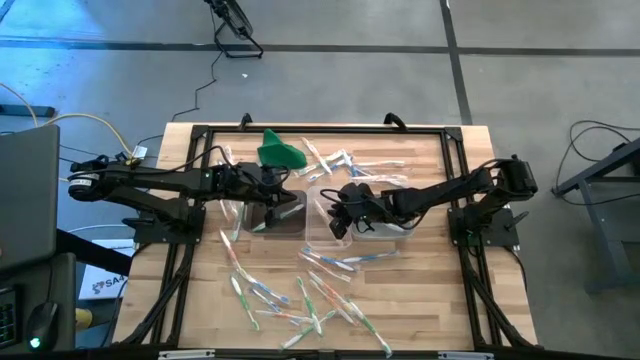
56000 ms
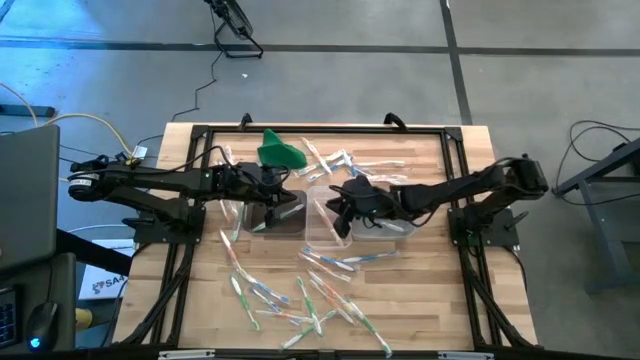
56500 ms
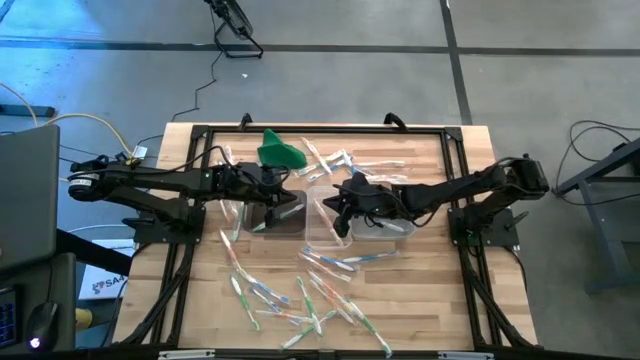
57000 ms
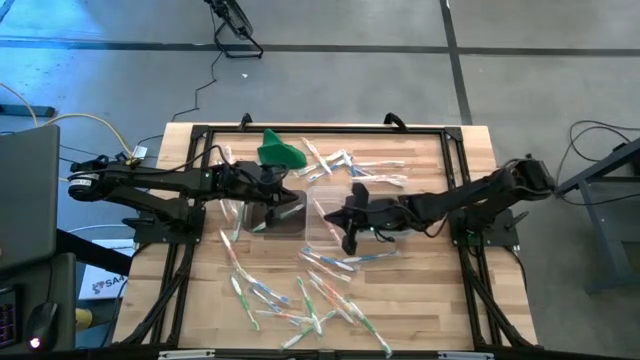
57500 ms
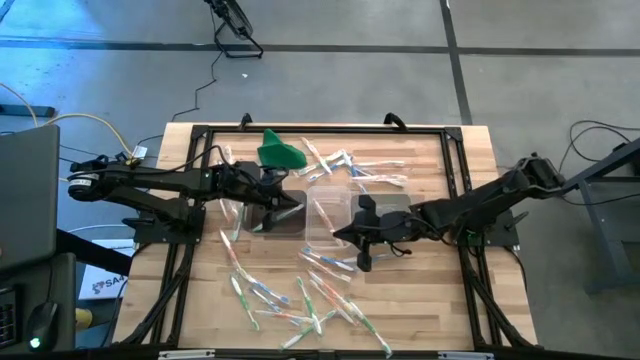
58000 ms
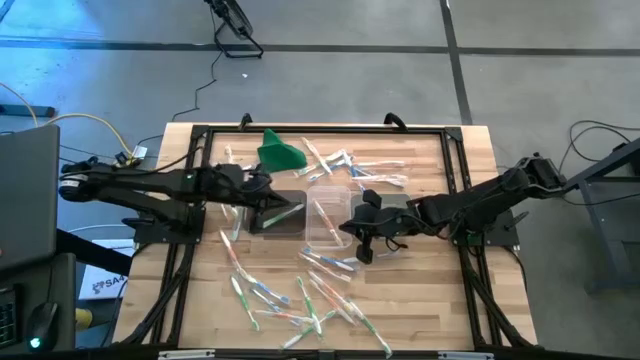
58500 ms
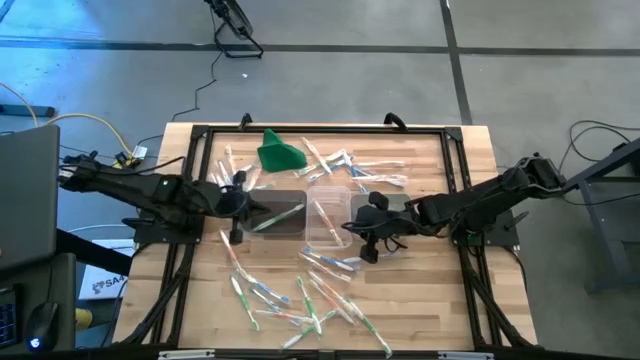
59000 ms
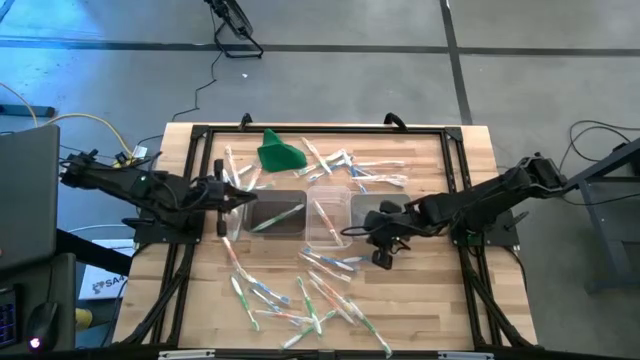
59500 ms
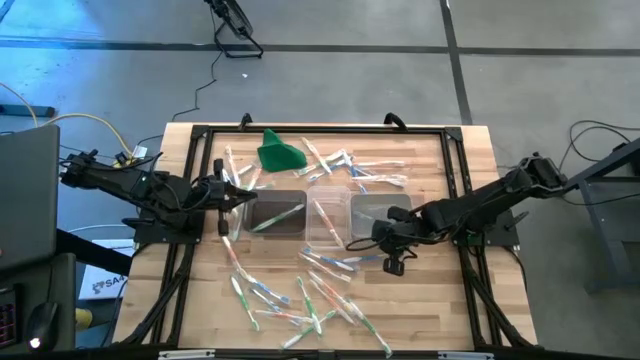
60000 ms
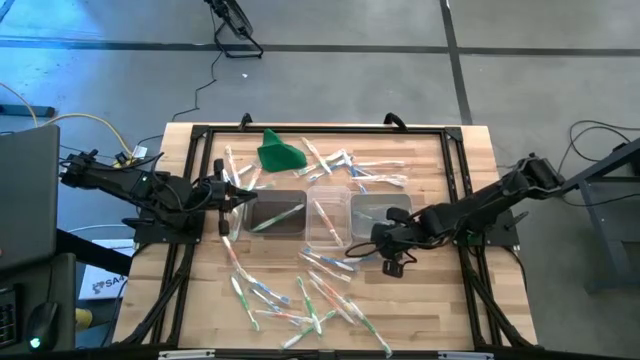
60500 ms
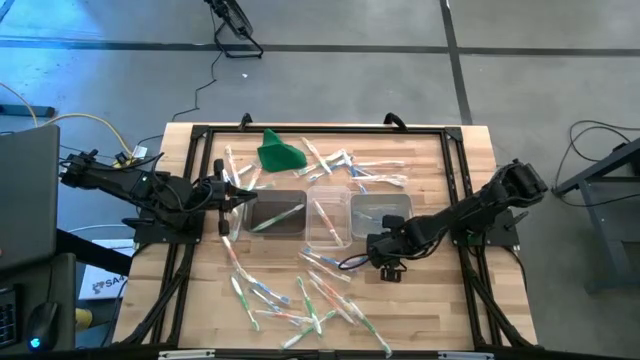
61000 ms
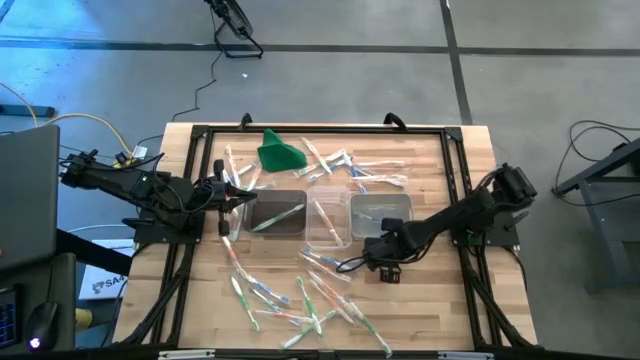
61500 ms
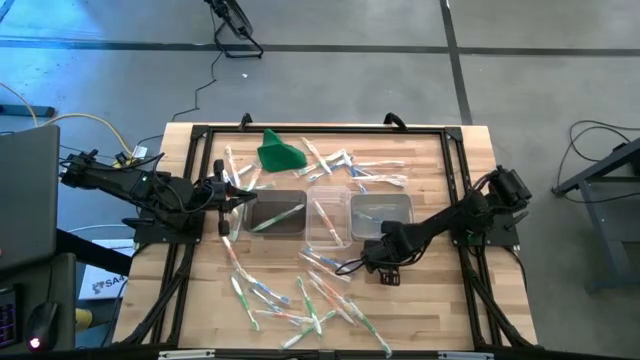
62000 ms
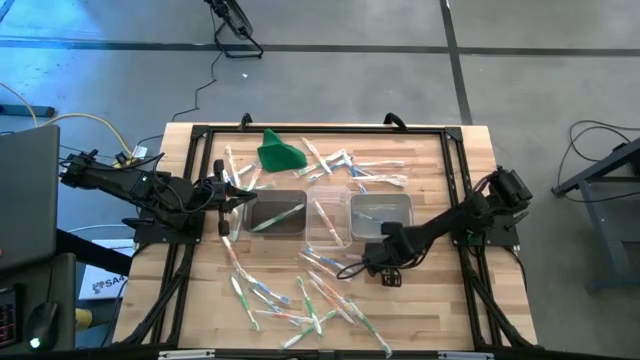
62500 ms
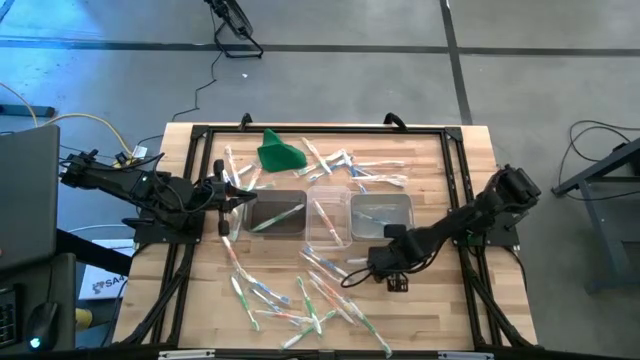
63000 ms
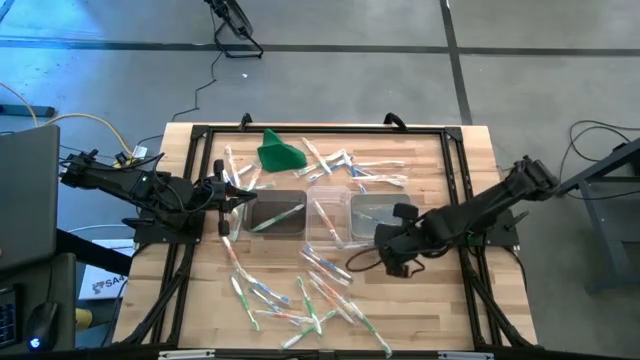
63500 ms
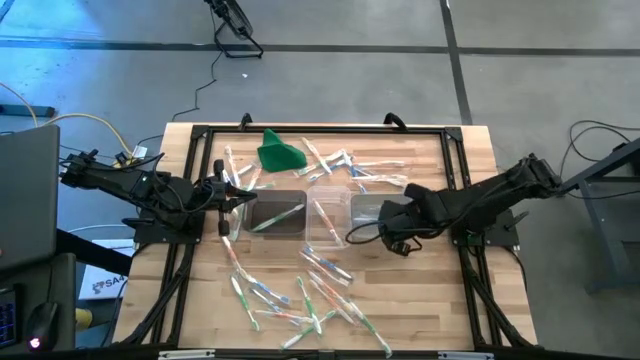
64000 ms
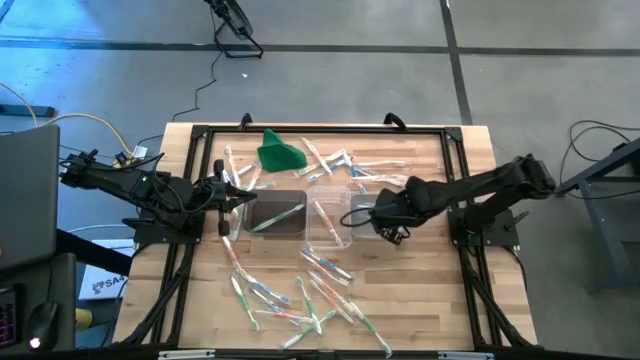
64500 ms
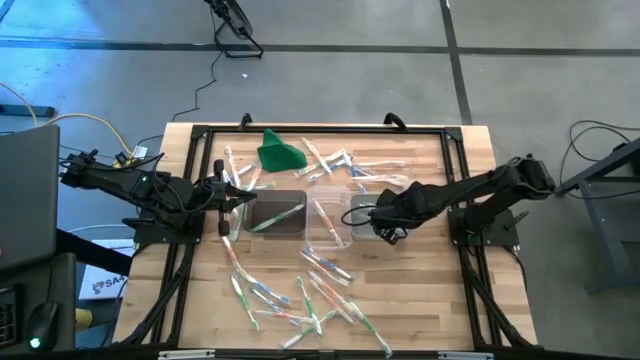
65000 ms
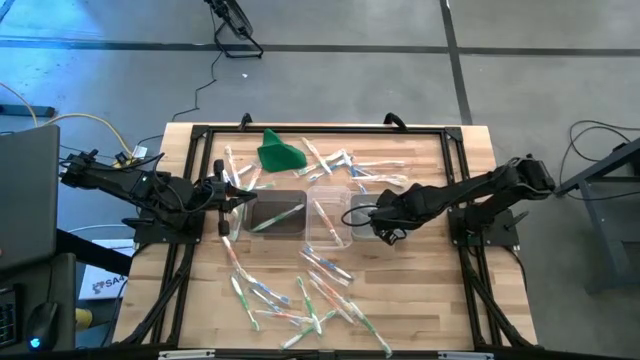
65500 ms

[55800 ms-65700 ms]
Task: Pick & Place Toothbrushes
Put the blue toothbrush into the gray bin

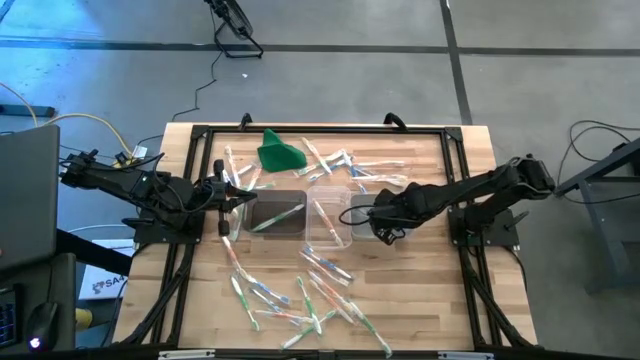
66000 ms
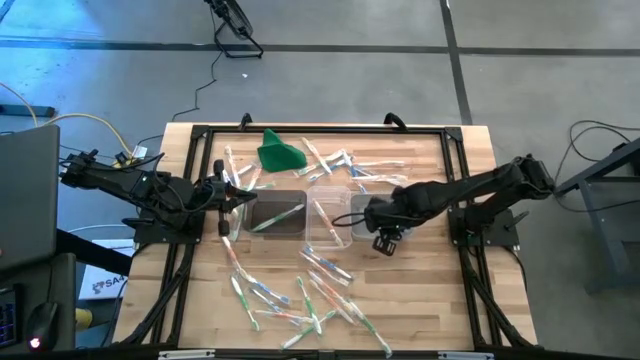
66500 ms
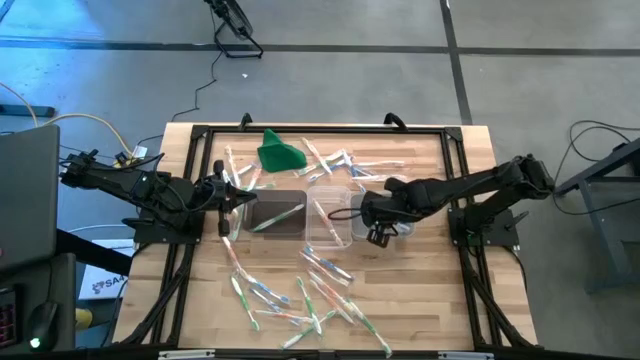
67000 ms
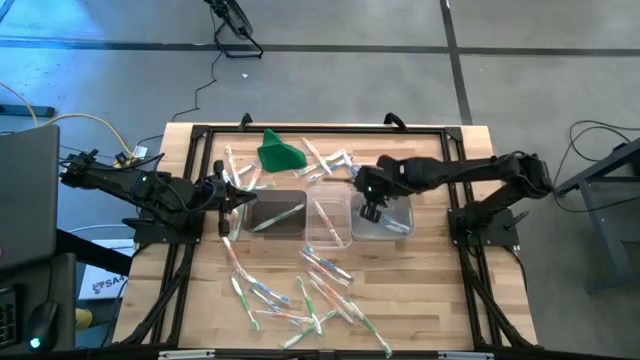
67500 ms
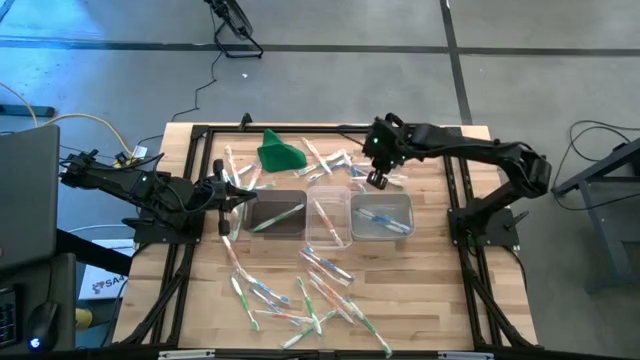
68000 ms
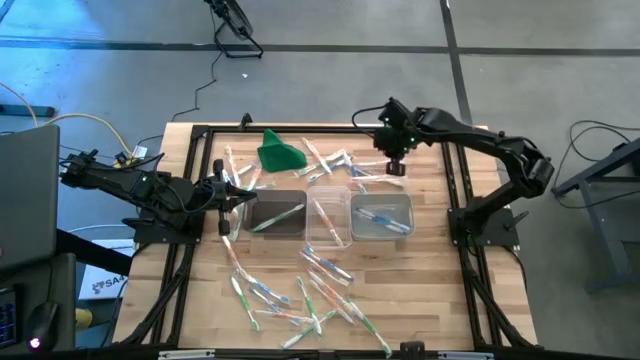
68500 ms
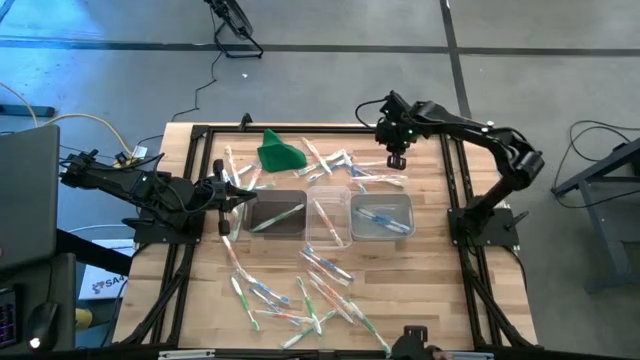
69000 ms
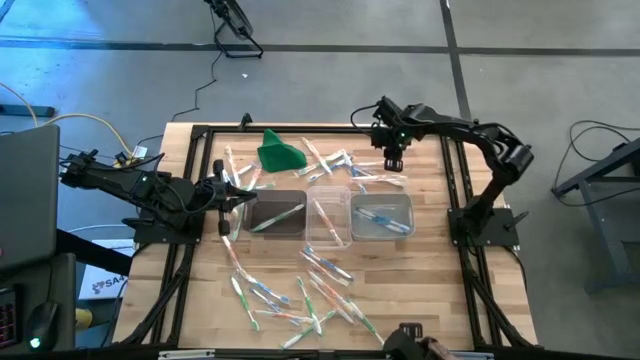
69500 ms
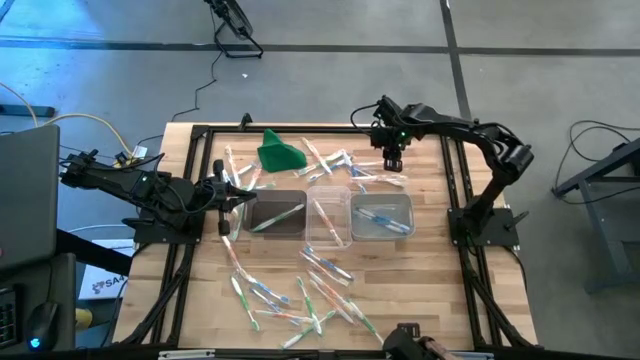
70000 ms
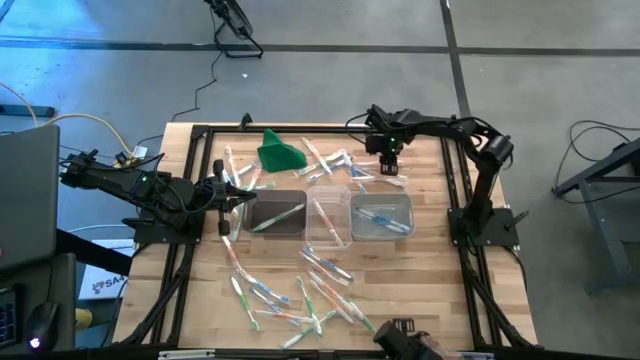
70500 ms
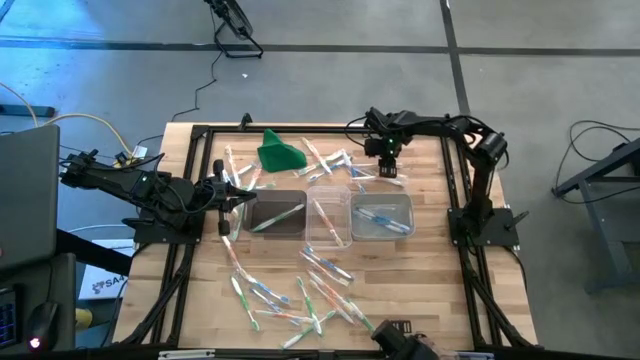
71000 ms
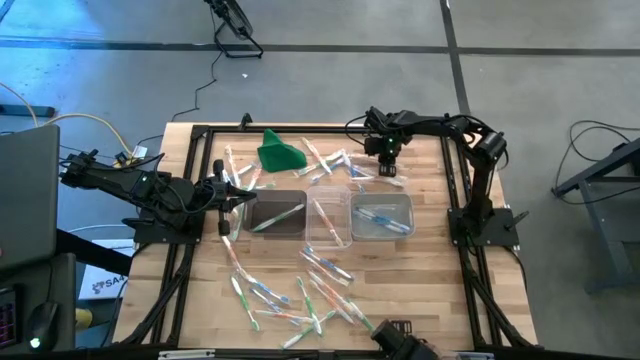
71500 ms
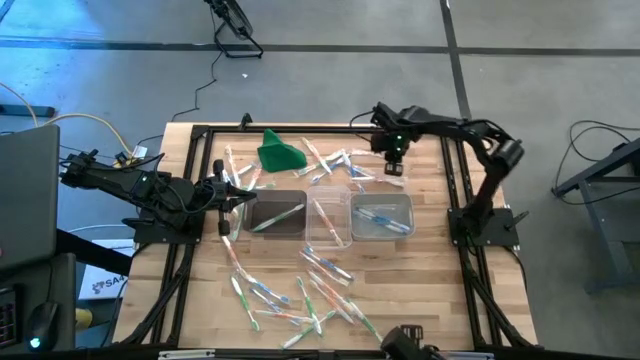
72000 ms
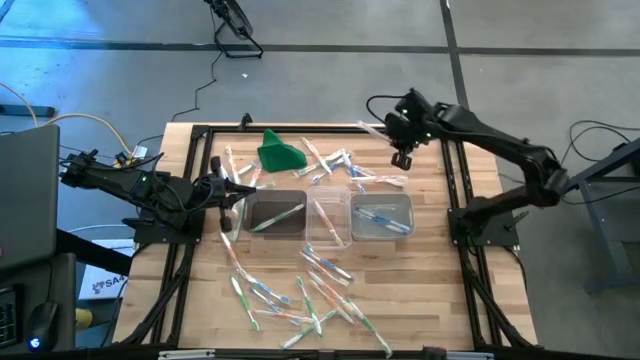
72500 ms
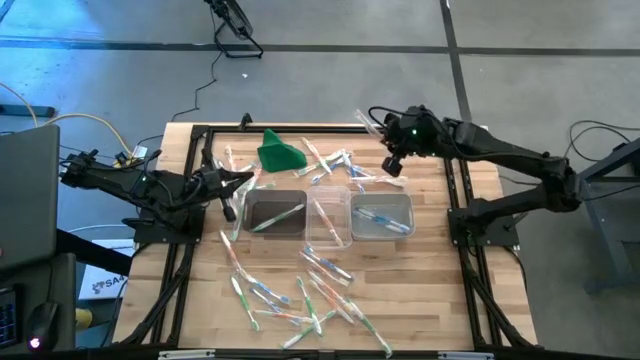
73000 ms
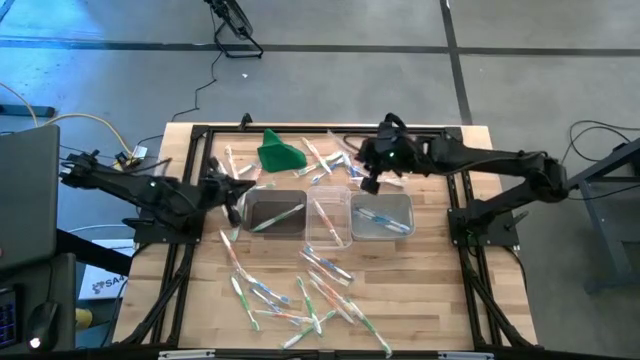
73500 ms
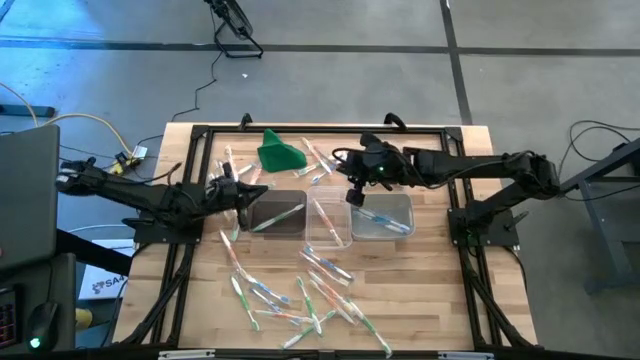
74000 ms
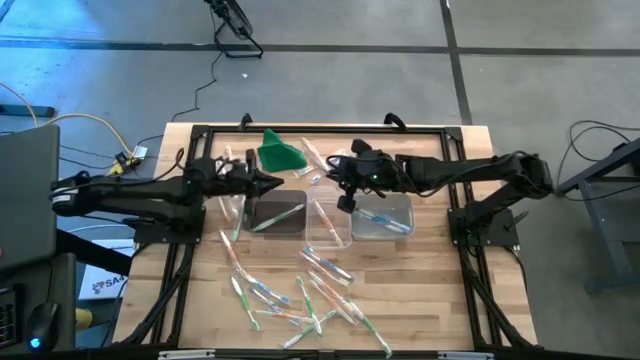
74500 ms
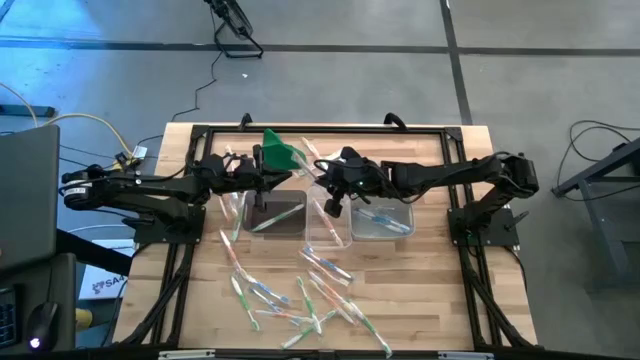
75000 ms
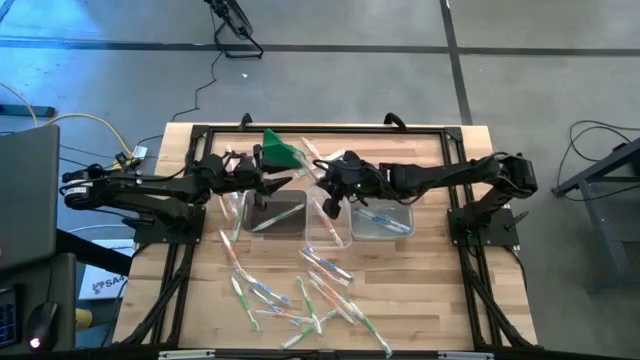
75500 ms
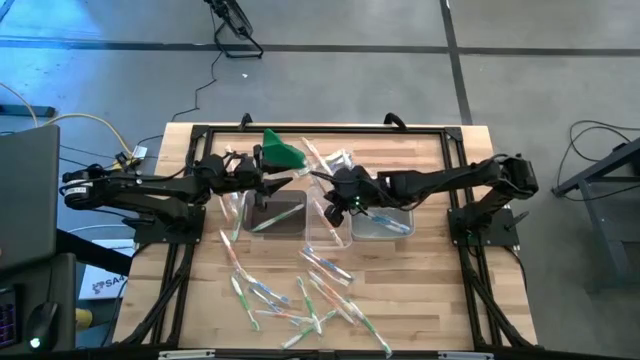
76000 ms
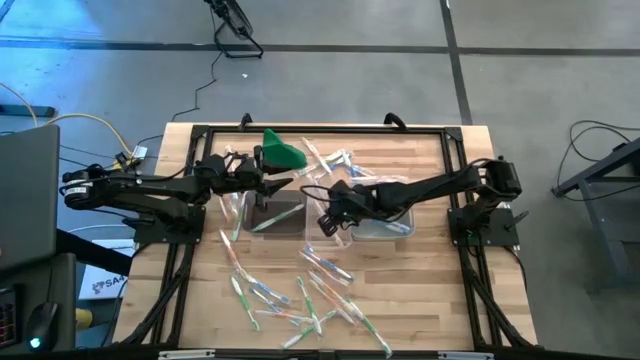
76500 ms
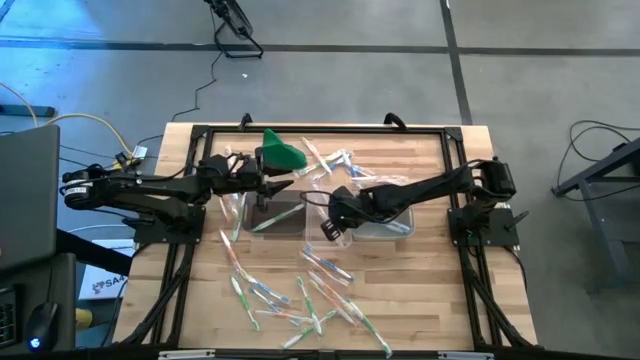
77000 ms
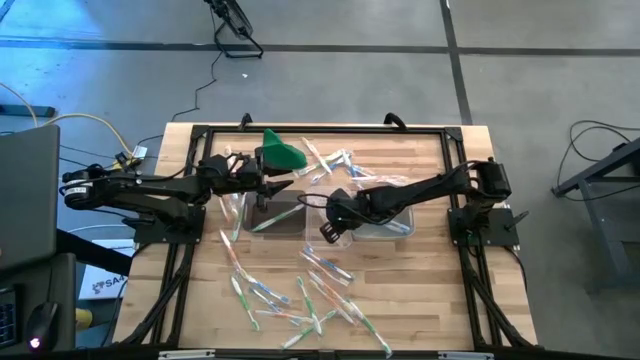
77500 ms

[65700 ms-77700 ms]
Put the orange toothbrush into the transparent bin
